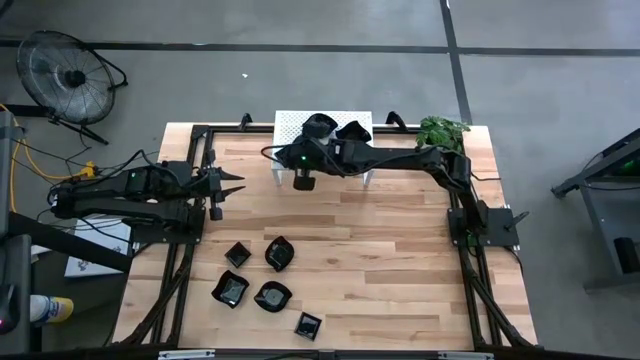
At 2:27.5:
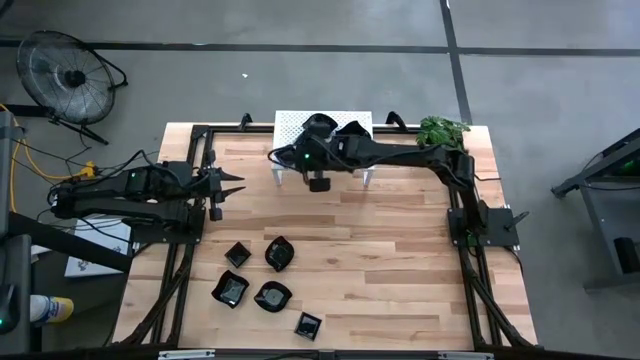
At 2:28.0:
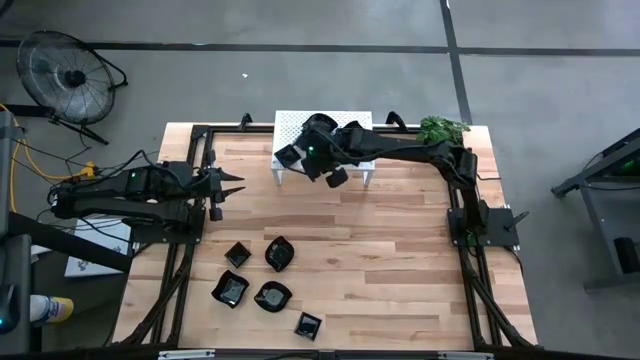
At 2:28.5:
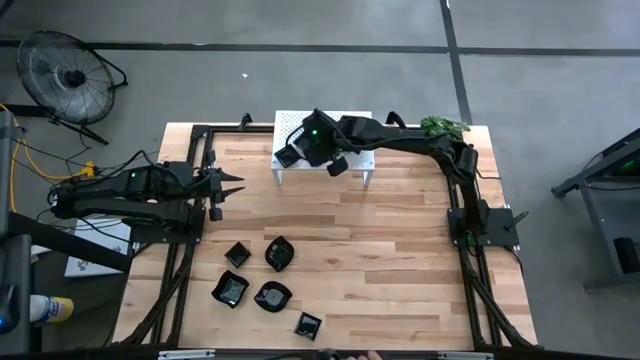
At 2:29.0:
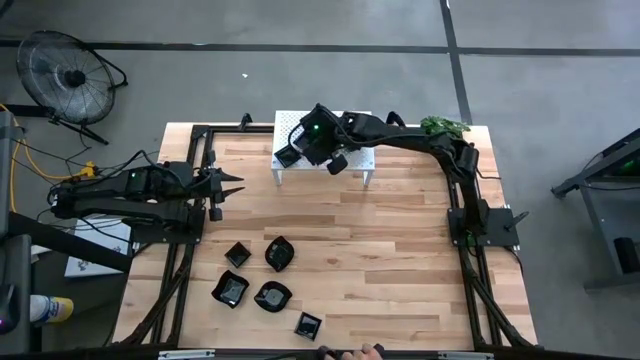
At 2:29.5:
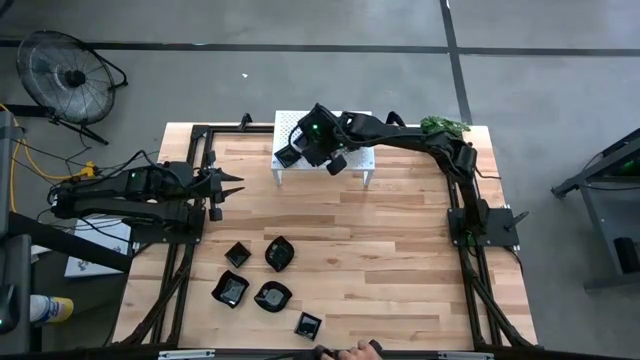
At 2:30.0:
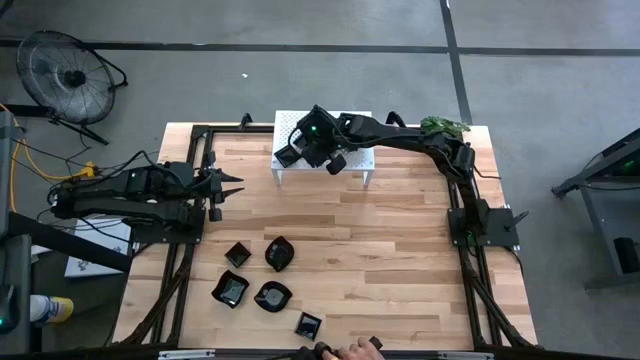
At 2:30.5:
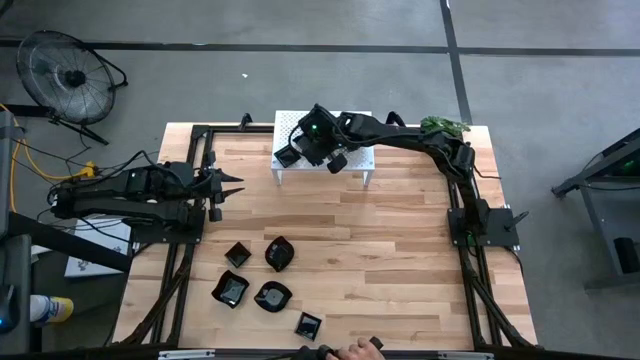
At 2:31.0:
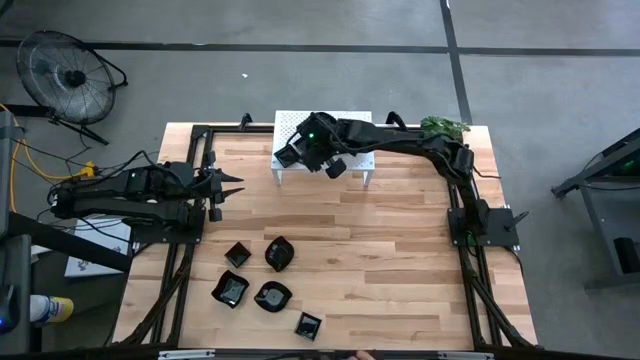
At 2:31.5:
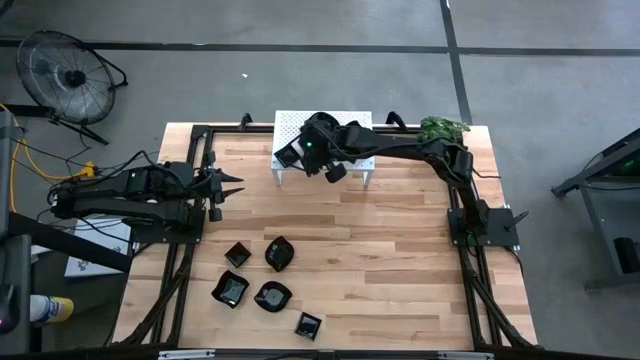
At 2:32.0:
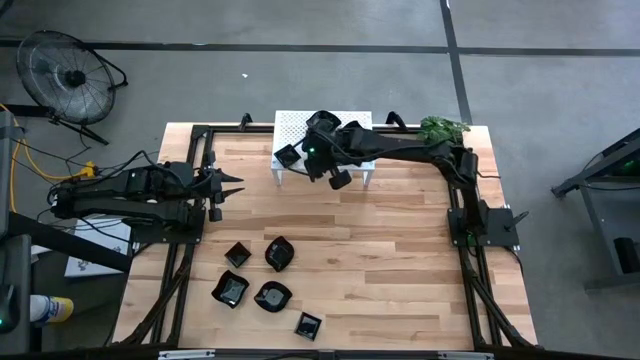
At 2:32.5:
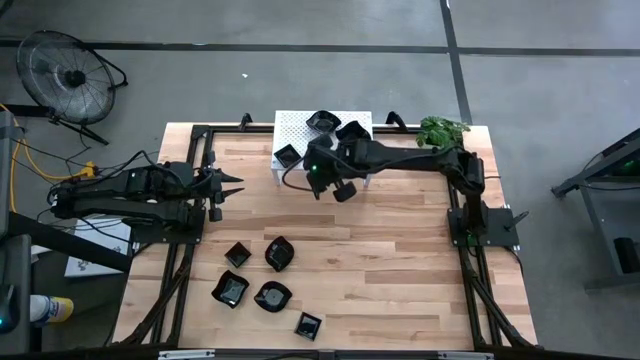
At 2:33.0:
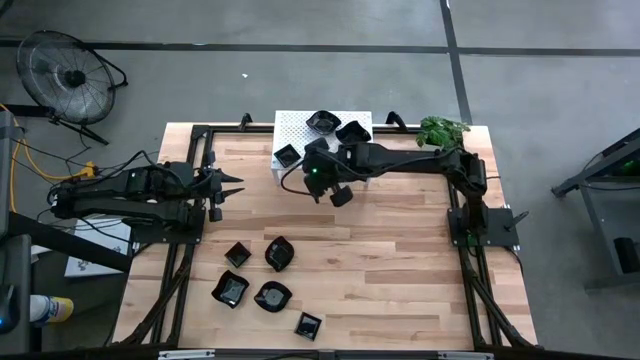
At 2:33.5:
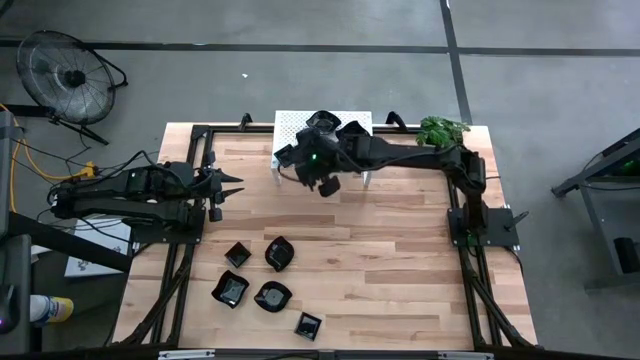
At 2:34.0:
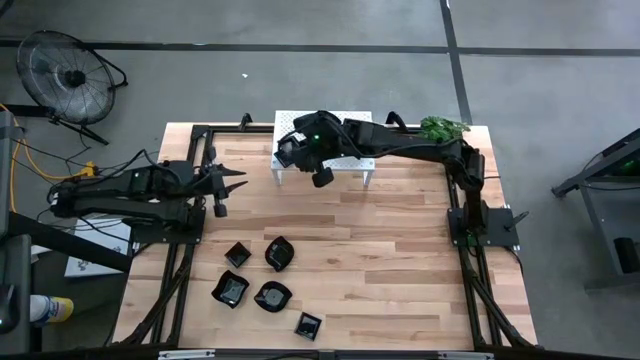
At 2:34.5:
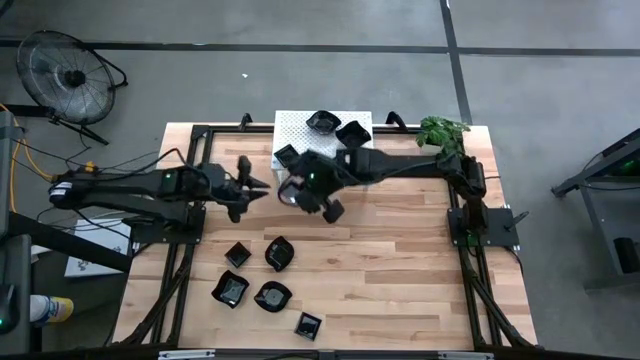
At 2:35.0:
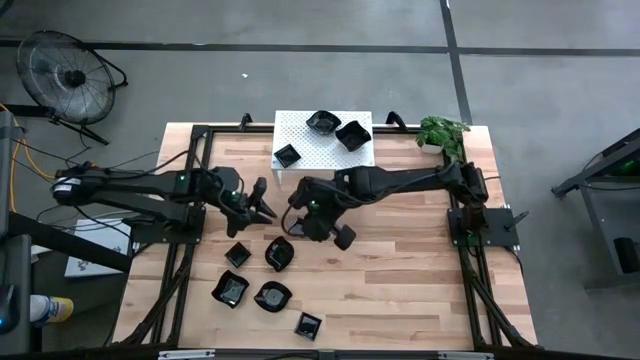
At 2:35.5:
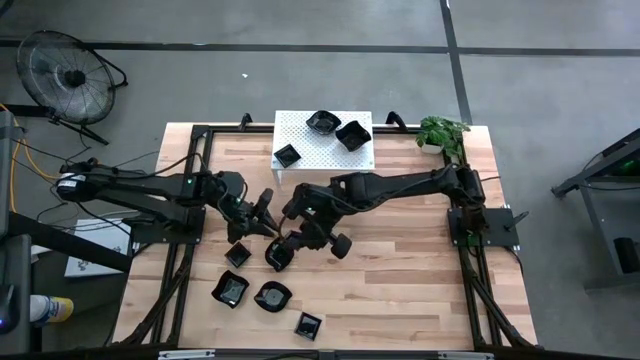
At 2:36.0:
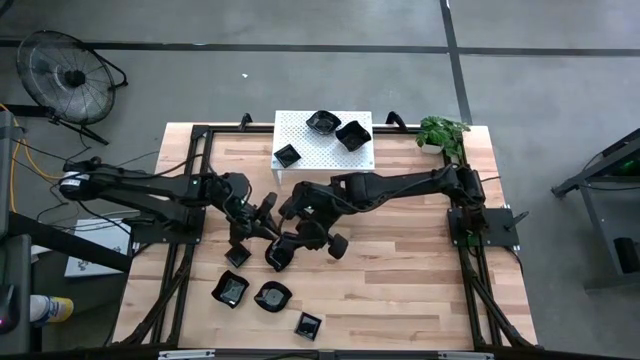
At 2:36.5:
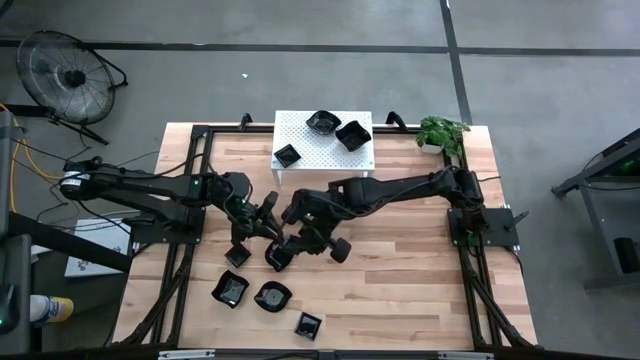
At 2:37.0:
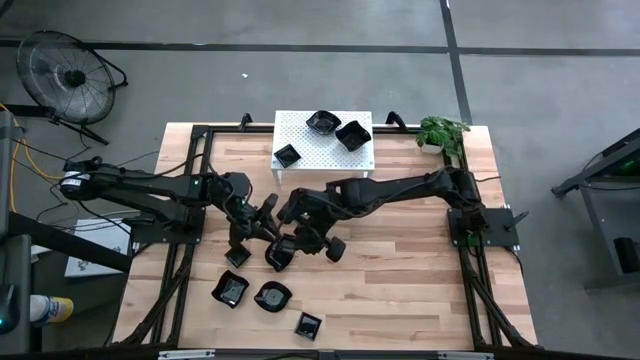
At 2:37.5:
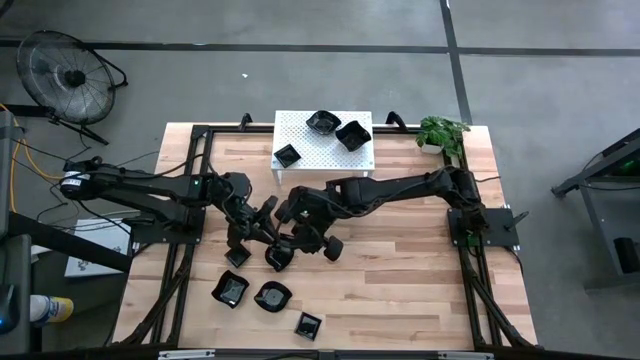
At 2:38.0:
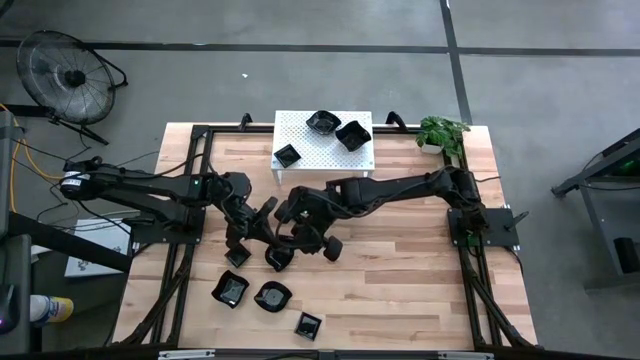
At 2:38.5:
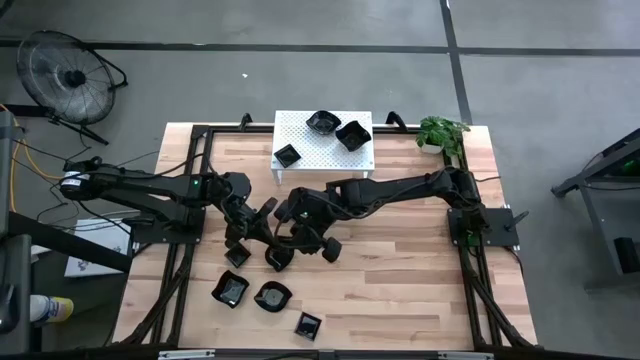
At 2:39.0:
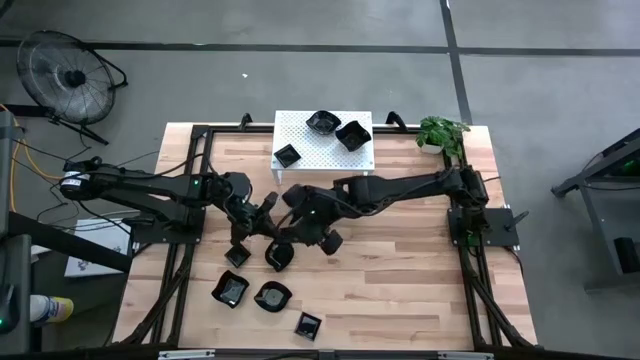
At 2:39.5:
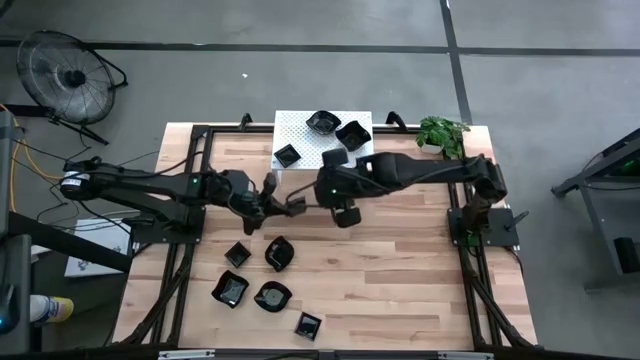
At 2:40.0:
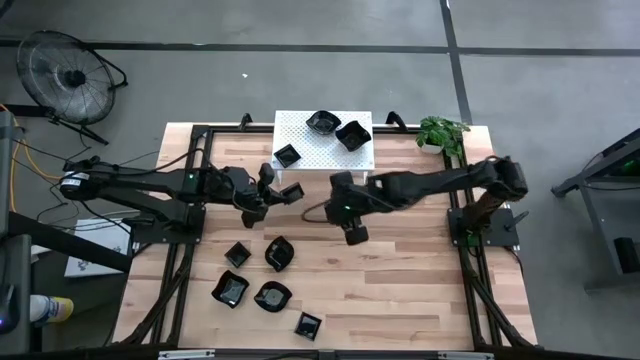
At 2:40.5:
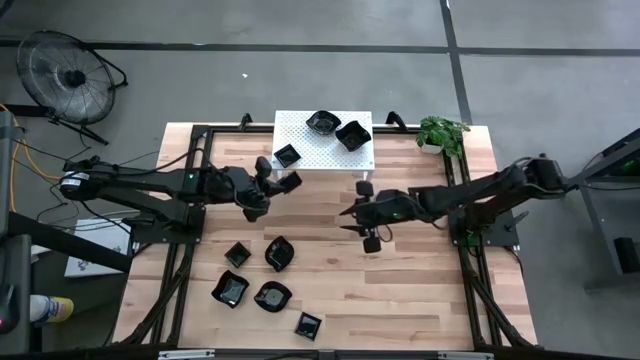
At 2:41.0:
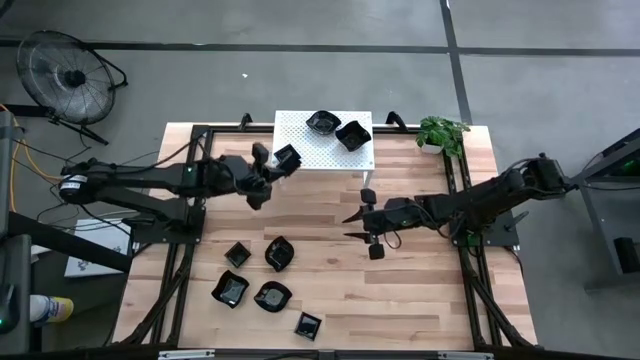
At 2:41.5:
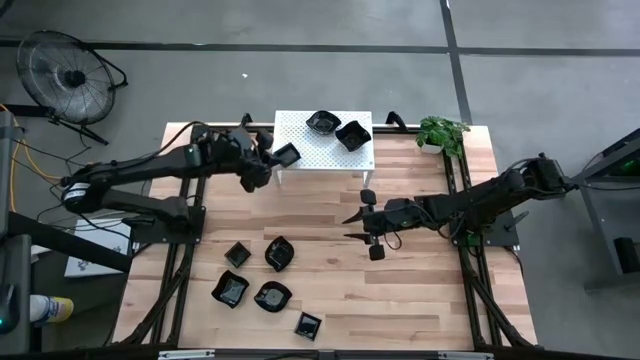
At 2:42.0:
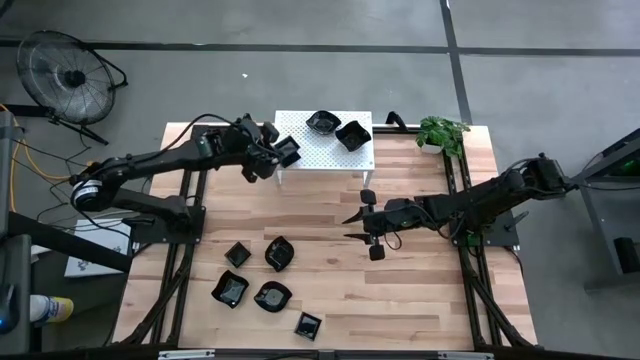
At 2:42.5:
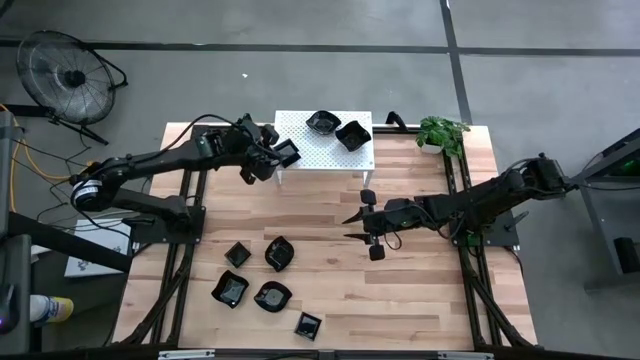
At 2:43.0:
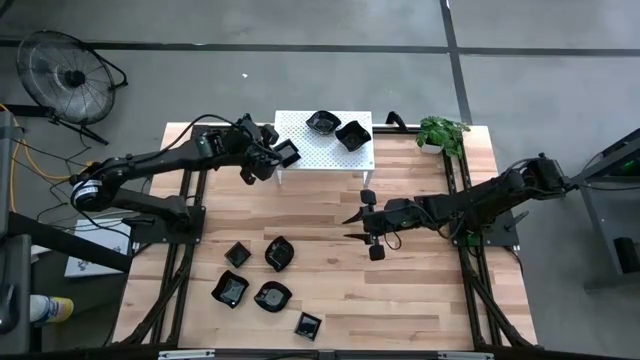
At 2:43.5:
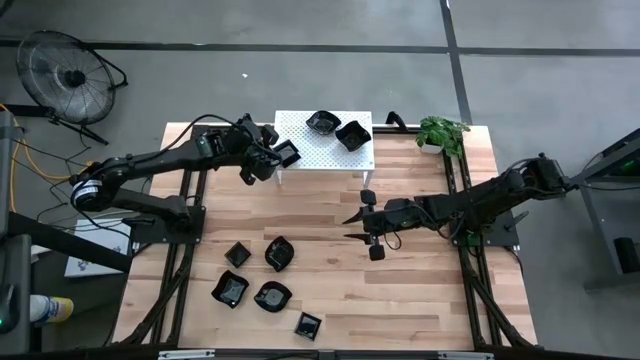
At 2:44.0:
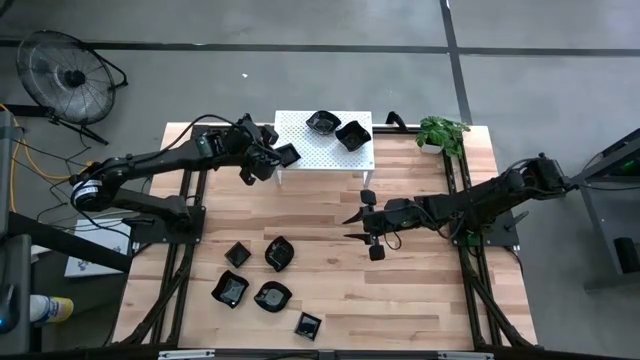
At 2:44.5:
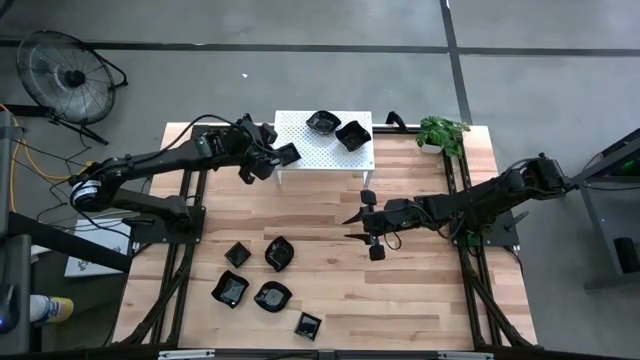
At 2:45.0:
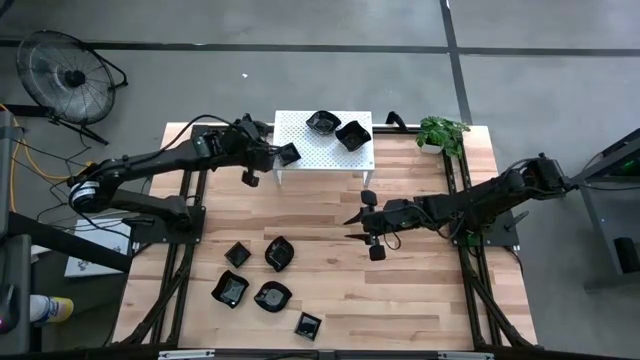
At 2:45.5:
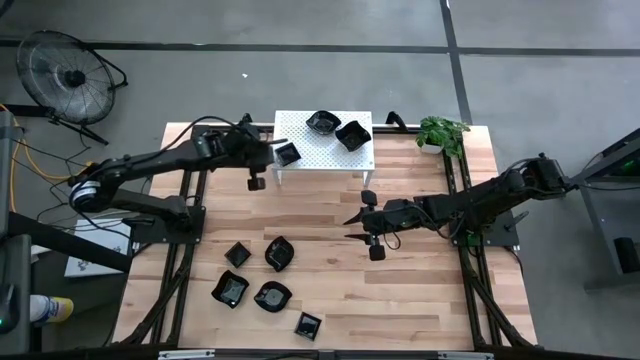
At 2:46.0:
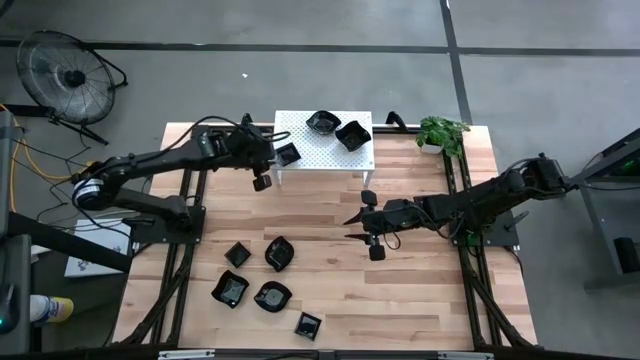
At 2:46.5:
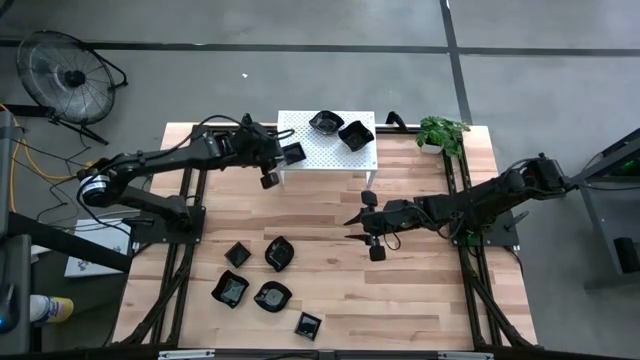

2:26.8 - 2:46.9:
Task: Pick & Place Mini shaped plates
Stack the black square plate on top of the black square plate on the shelf

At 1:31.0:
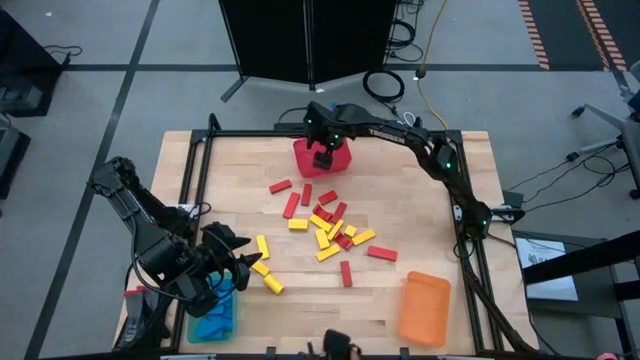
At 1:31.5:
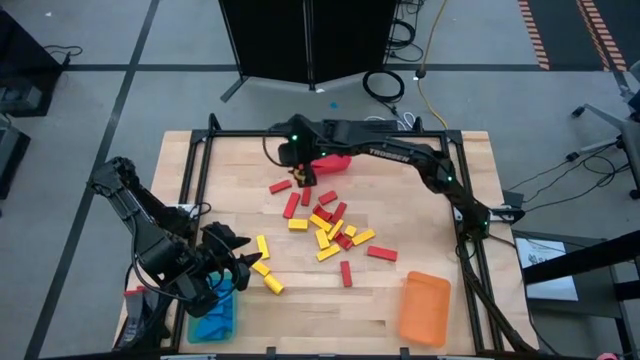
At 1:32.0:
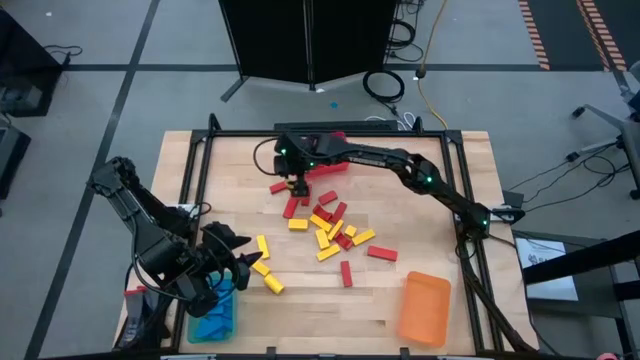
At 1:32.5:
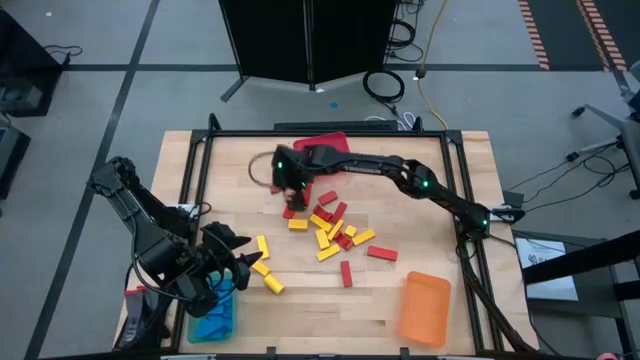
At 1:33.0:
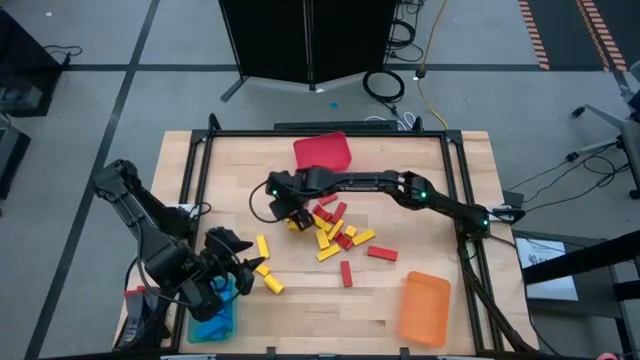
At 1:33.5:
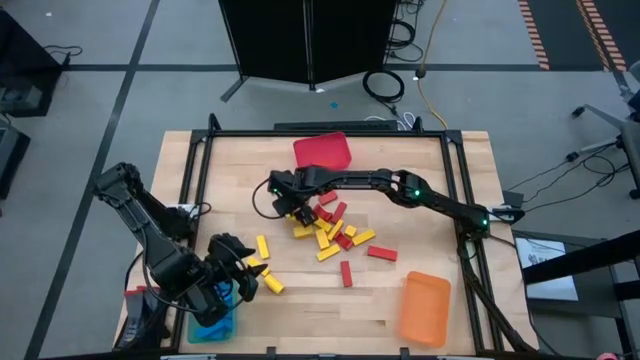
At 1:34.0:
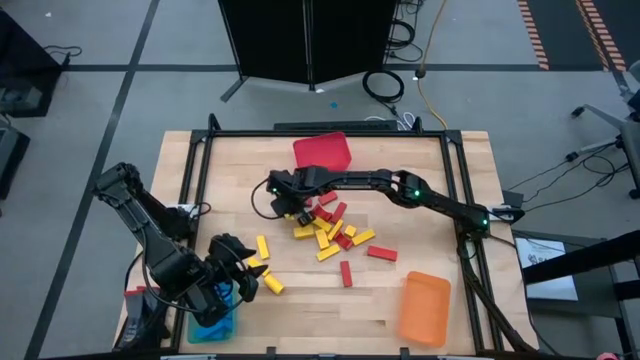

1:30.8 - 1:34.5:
Task: Sort blocks
Put the red block into the red bin
